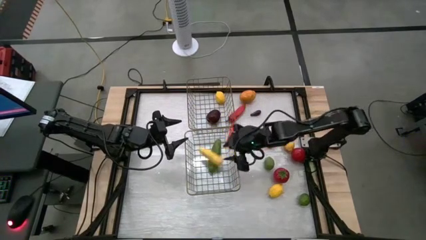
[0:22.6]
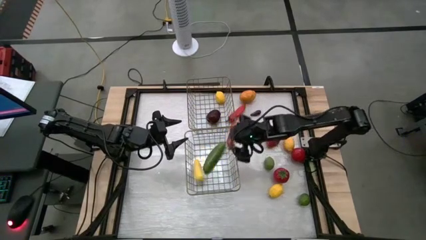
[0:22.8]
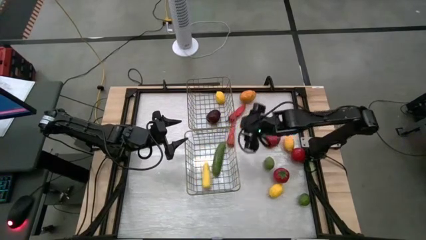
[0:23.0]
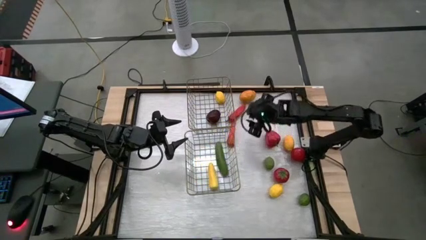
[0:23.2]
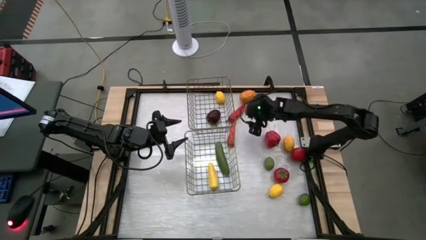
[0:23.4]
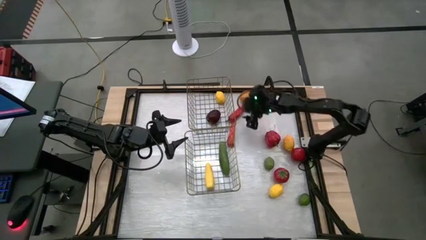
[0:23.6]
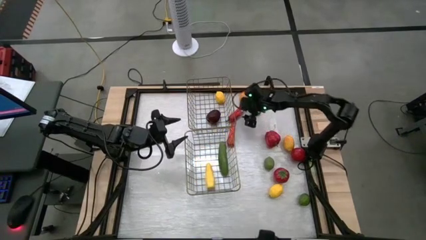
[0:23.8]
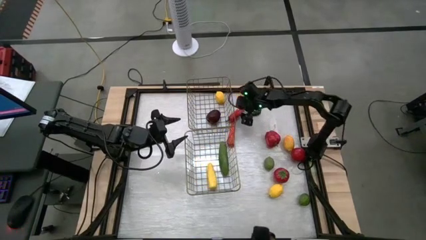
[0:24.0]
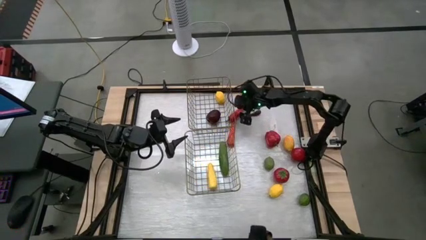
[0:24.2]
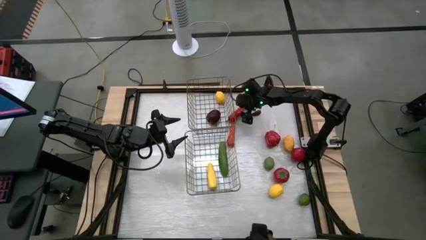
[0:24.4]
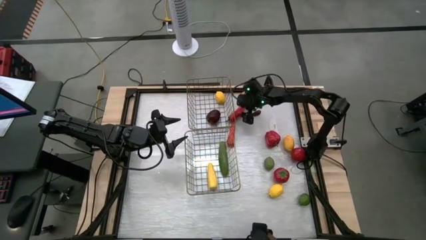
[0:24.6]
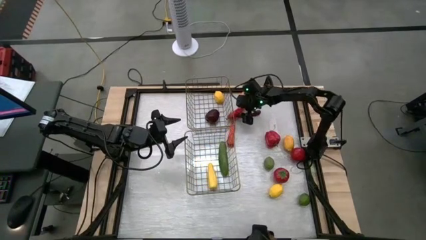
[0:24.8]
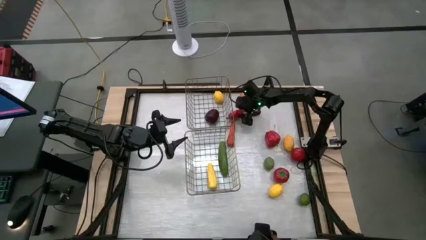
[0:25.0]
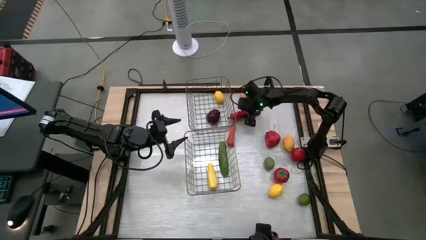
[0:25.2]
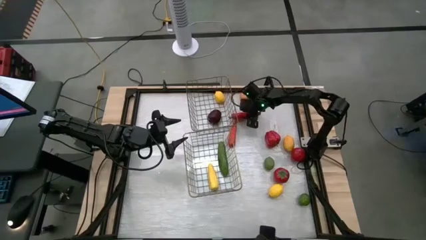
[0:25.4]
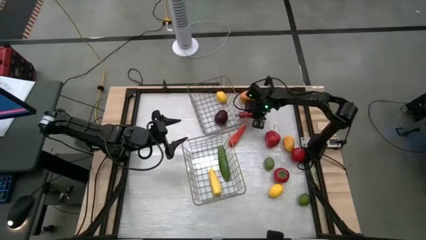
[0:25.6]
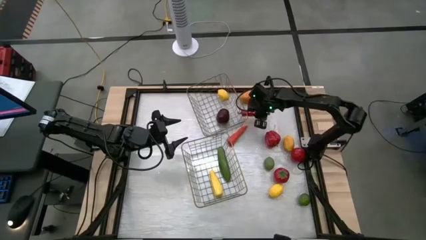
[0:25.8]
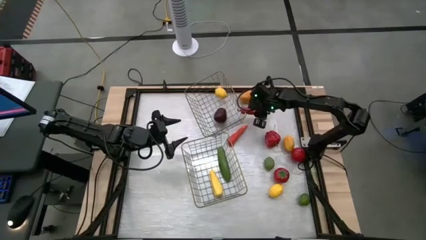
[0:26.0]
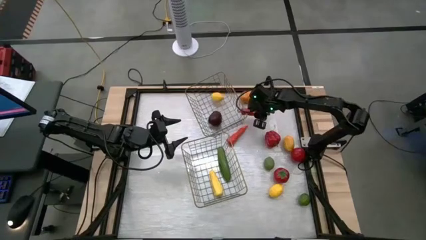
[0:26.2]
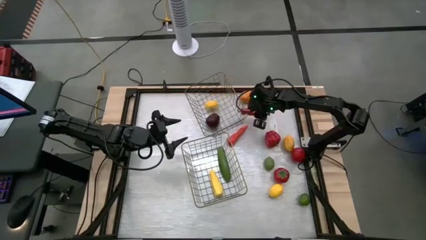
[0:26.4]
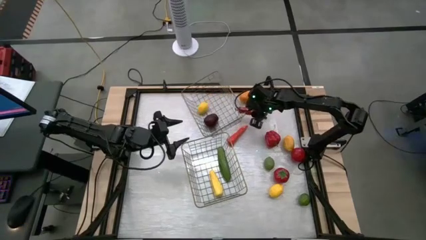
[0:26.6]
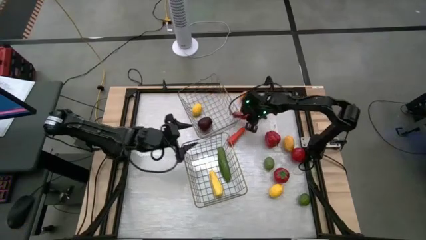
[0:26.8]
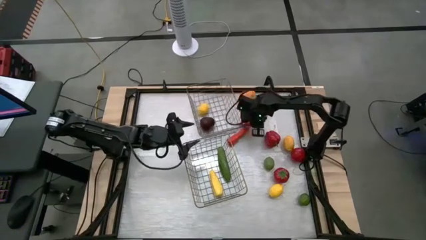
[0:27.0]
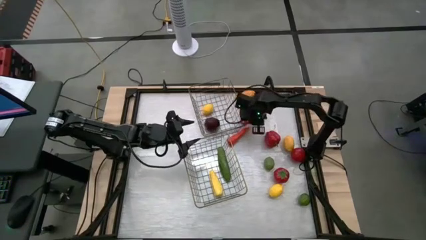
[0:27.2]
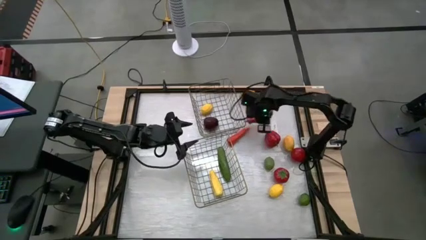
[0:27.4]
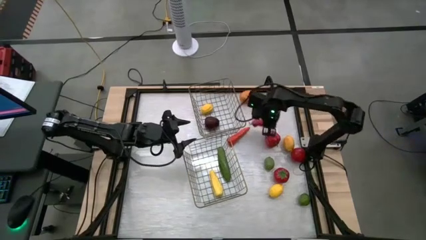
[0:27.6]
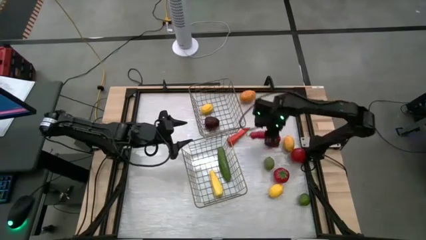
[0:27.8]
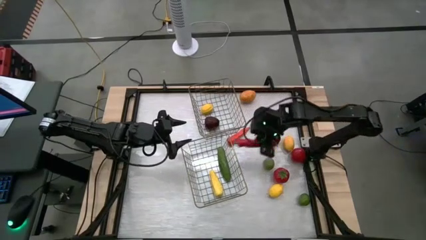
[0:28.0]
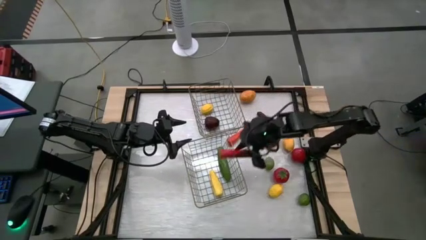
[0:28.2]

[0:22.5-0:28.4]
Task: Sort produce into baskets
Put the red chili pepper into the bottom wire basket

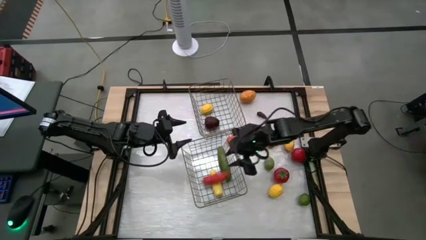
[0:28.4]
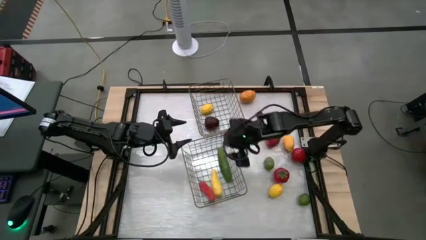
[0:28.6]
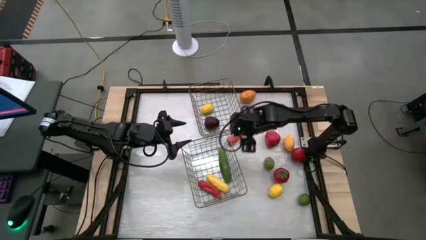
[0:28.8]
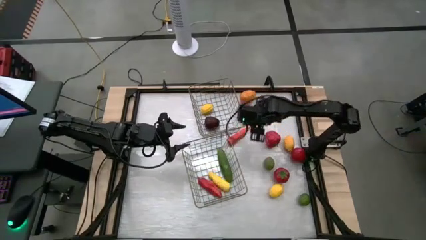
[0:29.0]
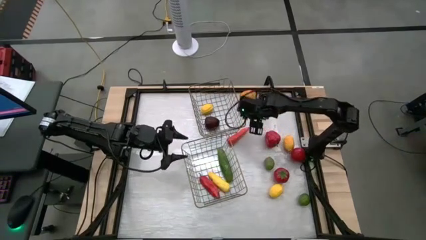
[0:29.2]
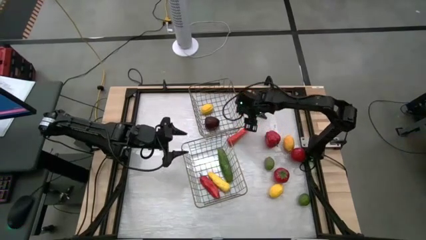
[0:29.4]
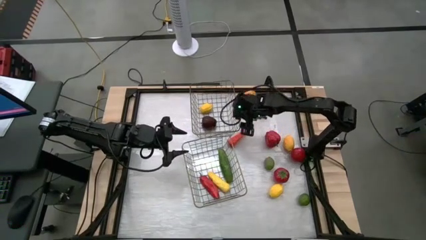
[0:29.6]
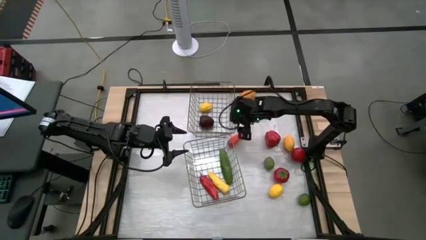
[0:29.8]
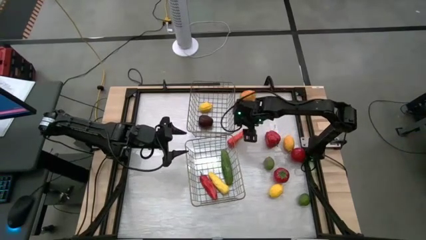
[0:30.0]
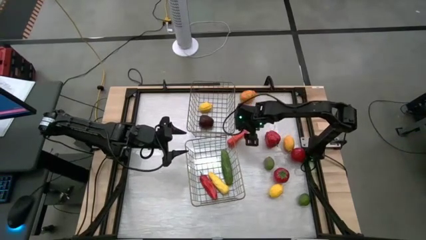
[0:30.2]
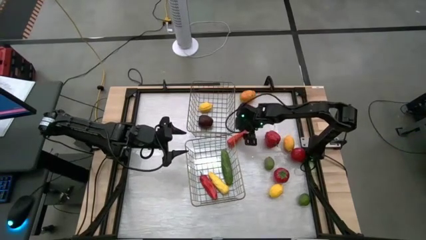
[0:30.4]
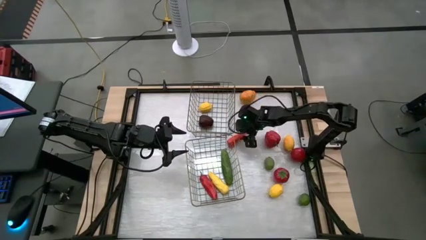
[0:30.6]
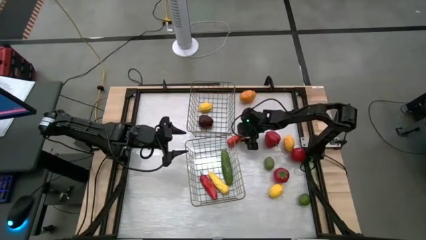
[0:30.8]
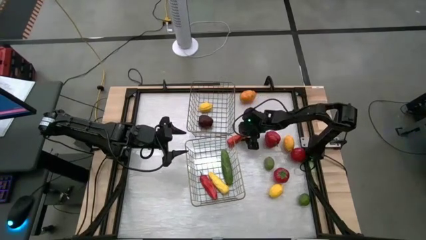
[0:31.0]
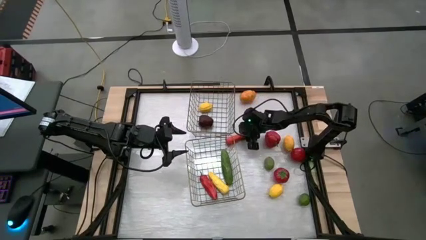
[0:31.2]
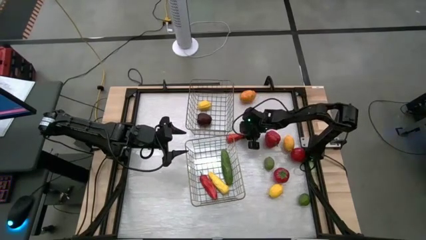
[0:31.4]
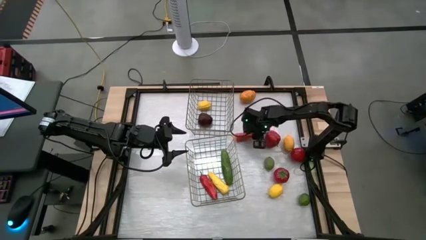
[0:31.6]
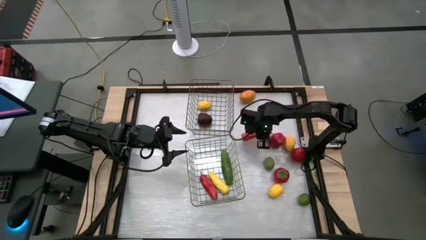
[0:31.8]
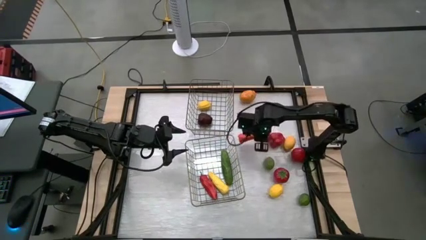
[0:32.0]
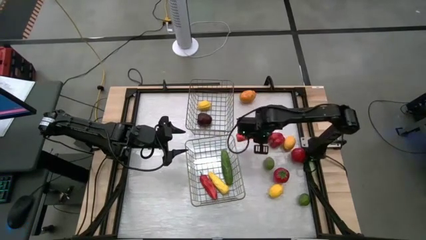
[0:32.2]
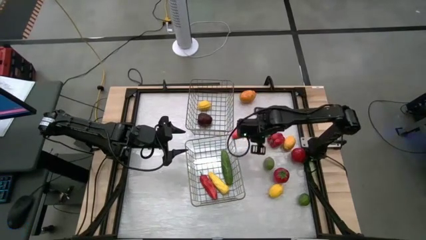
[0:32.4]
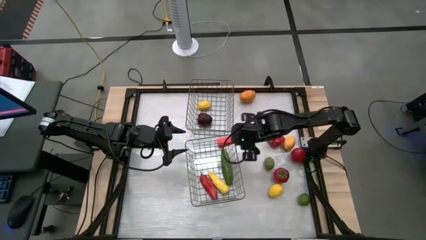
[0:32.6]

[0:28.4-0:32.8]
Put the orange carrot into the bottom wire basket

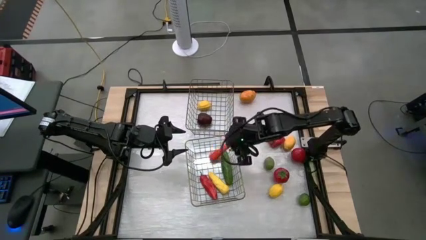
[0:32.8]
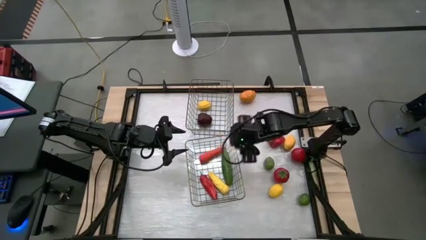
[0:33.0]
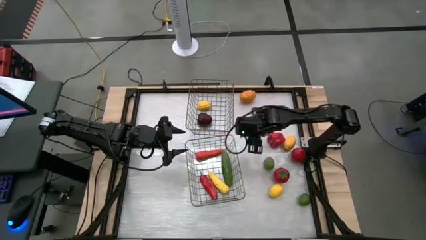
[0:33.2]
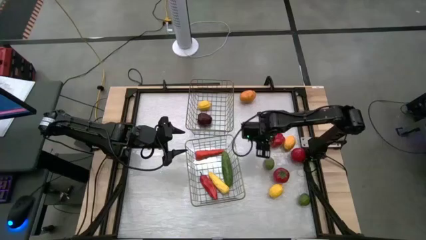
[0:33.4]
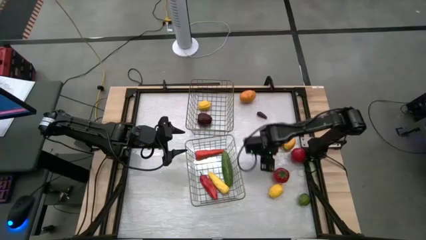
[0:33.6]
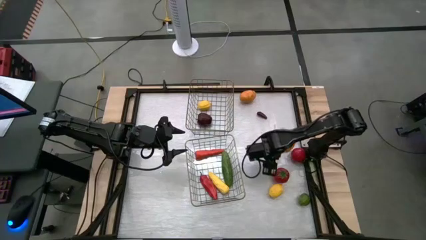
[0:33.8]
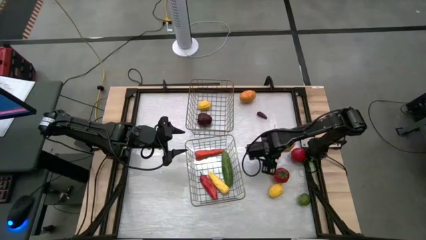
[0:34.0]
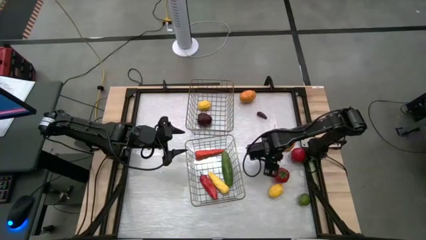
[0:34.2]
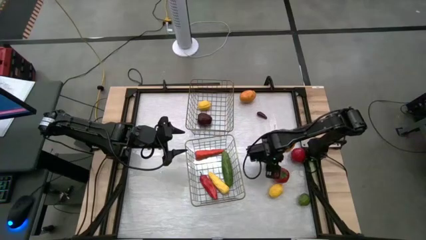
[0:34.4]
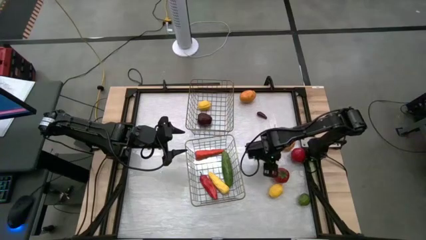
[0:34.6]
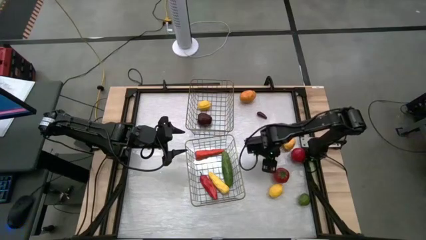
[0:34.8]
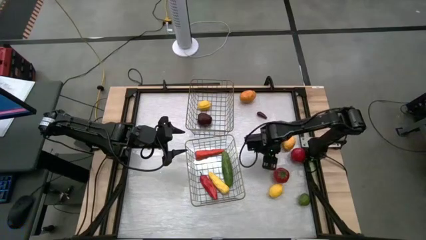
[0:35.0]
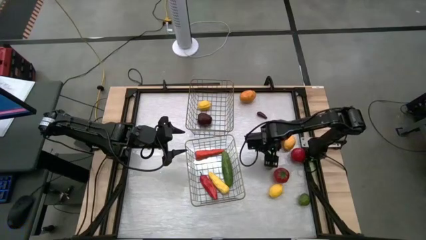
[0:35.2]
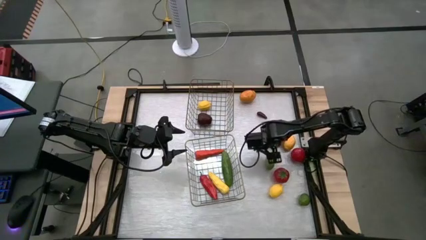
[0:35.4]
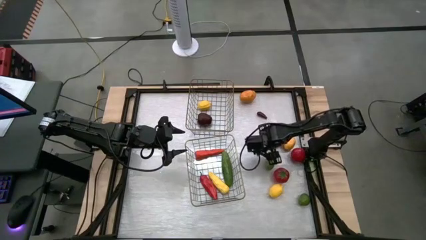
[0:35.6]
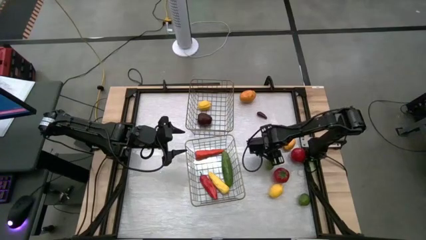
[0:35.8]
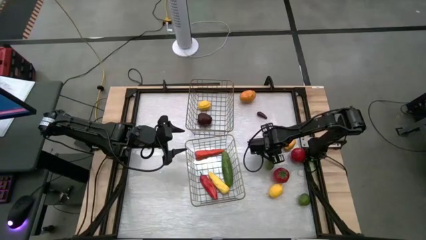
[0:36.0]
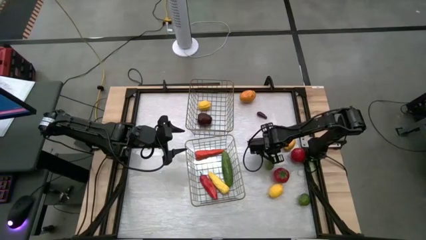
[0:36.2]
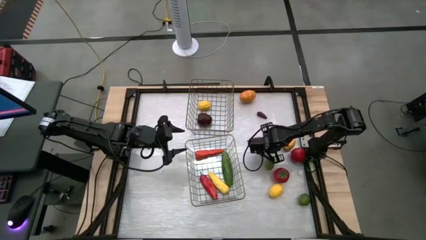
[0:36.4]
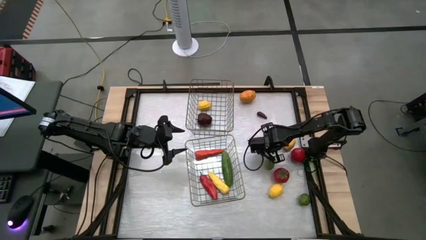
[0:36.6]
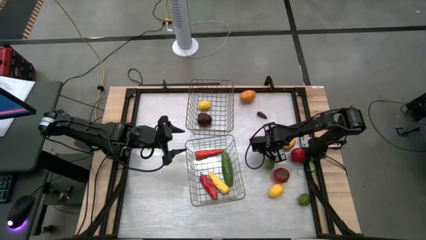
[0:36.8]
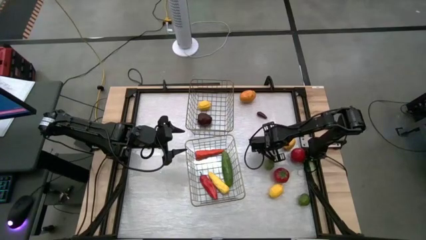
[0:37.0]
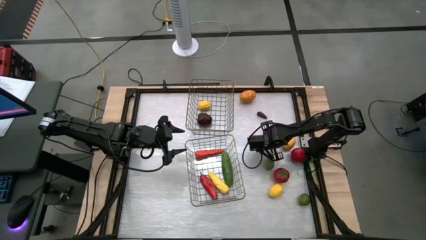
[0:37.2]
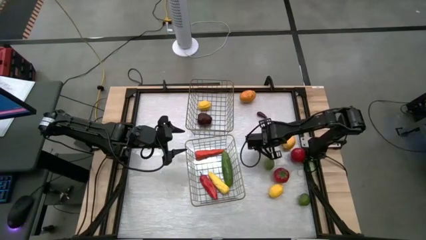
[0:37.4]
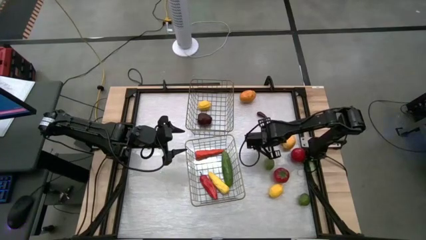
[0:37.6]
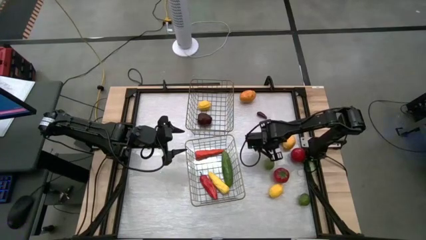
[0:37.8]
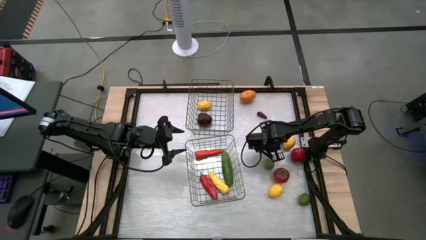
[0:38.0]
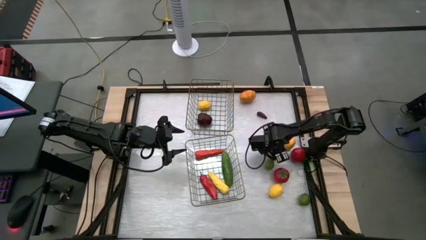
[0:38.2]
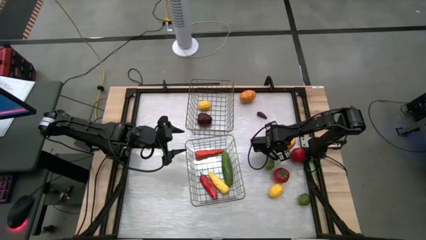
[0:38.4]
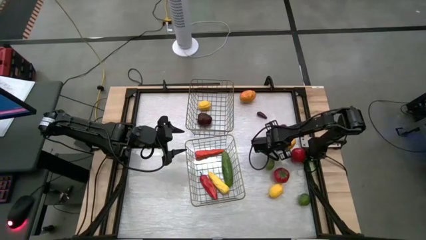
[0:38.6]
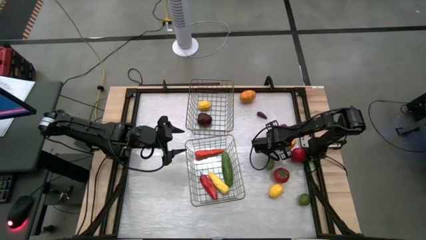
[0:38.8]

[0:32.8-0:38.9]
Put the red bell pepper into the bottom wire basket

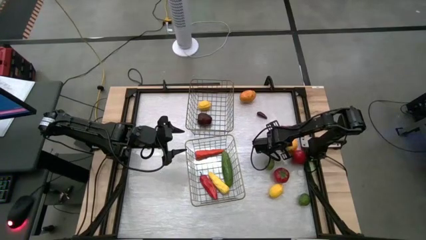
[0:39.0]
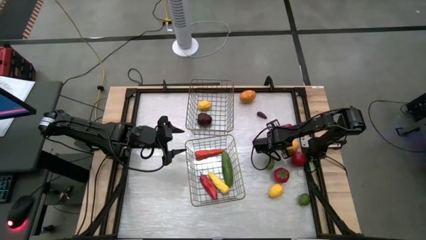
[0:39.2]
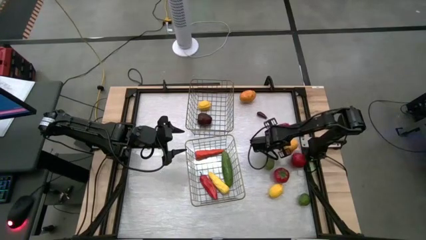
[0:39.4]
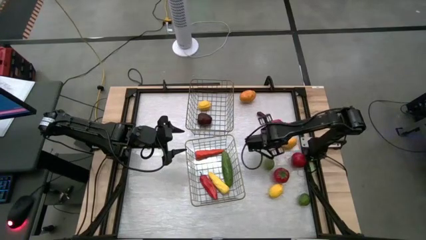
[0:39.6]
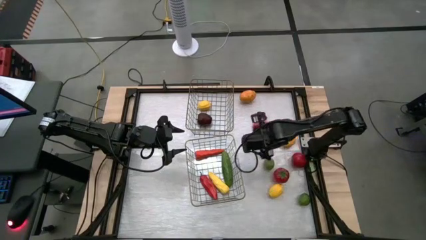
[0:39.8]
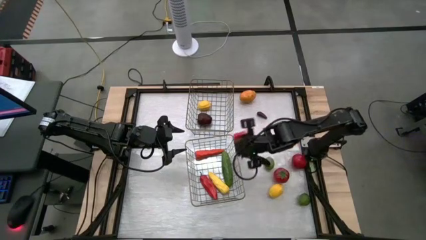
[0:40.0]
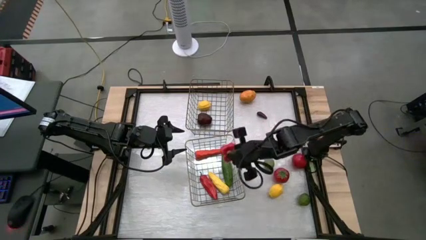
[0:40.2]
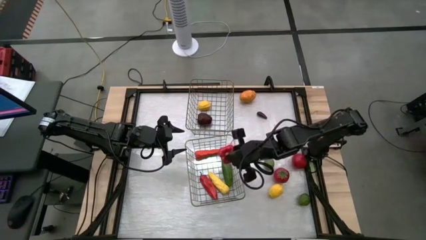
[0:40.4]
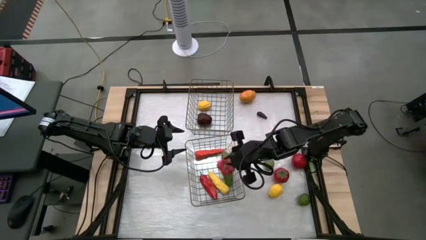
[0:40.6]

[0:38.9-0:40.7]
Put the red bell pepper into the bottom wire basket
